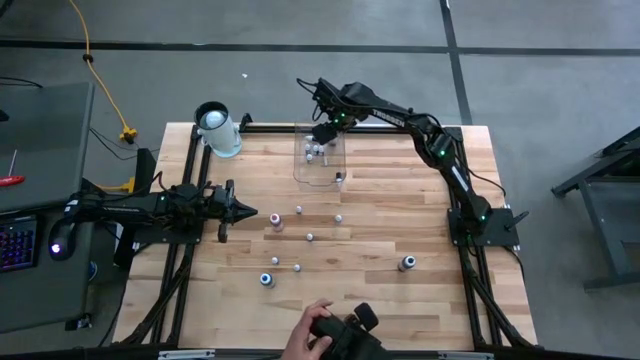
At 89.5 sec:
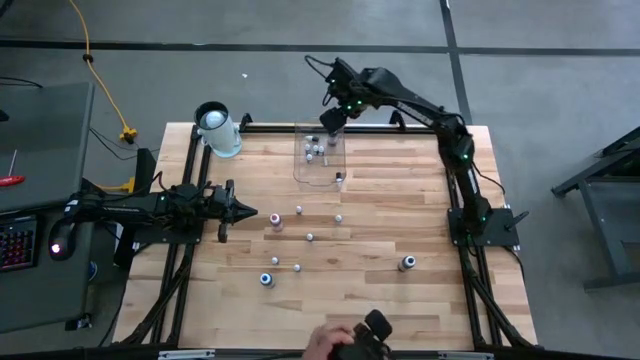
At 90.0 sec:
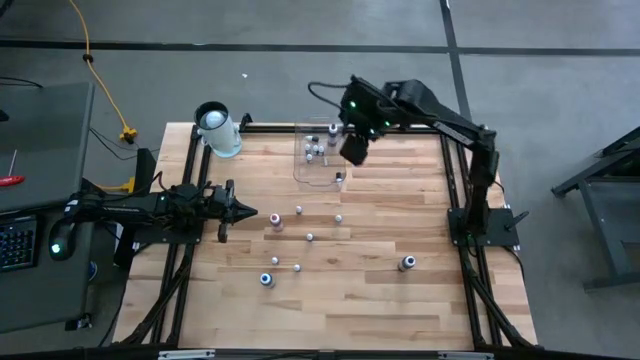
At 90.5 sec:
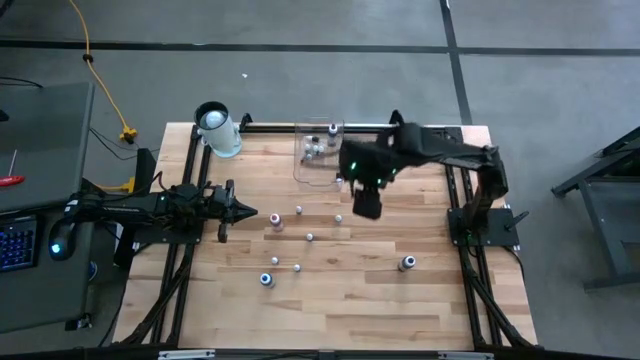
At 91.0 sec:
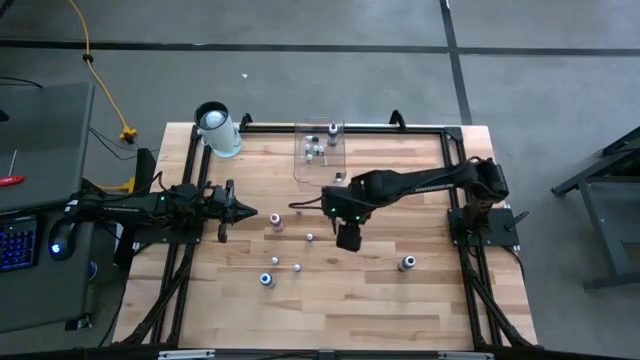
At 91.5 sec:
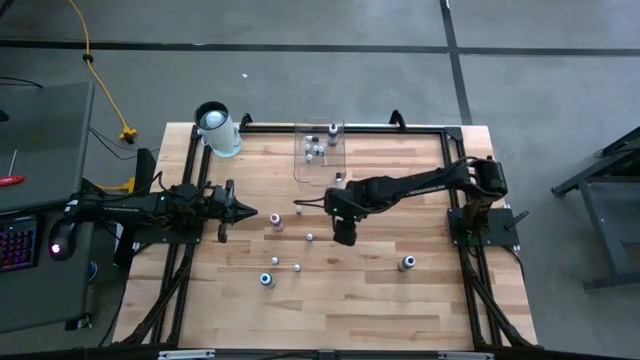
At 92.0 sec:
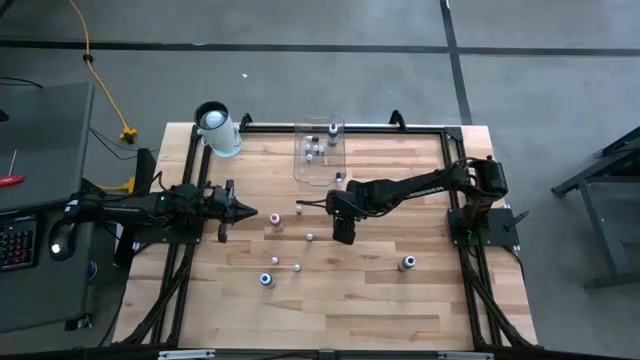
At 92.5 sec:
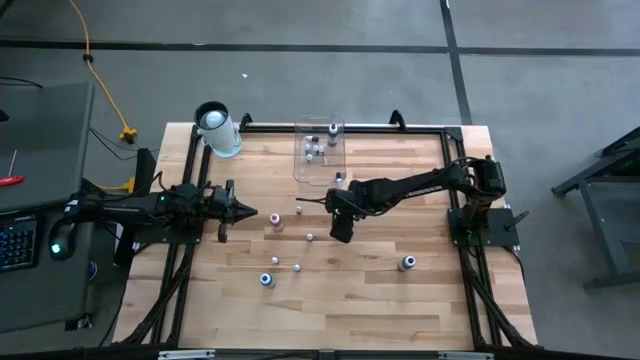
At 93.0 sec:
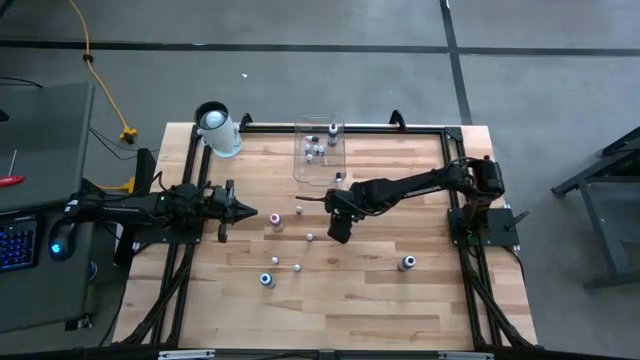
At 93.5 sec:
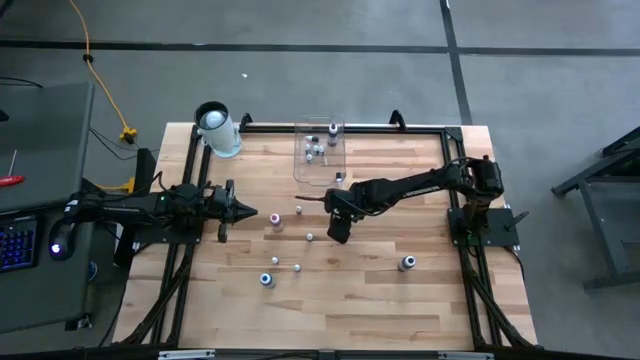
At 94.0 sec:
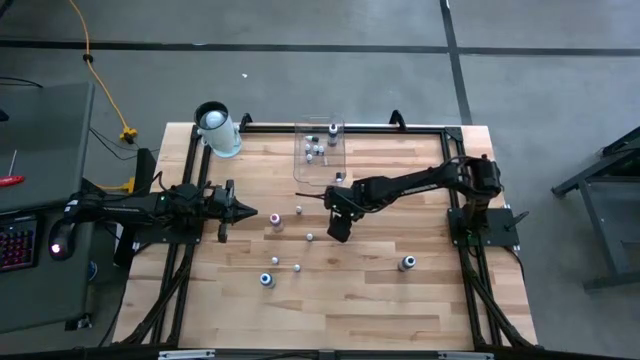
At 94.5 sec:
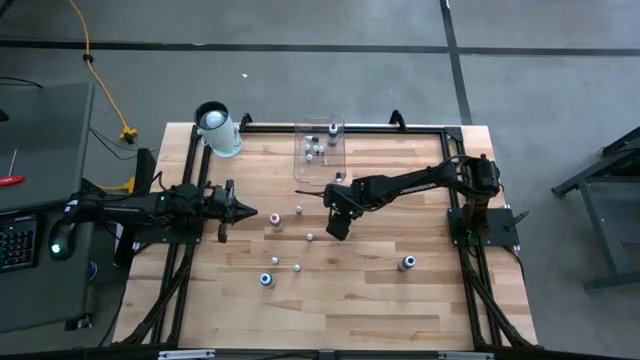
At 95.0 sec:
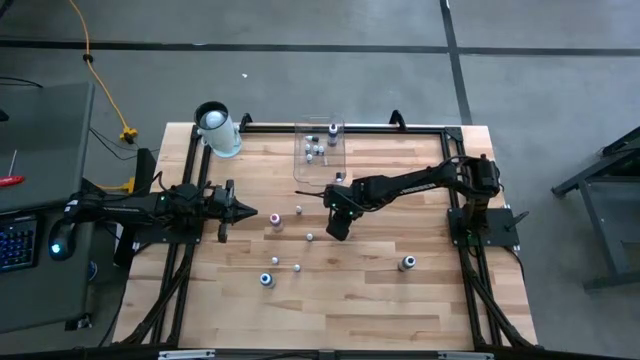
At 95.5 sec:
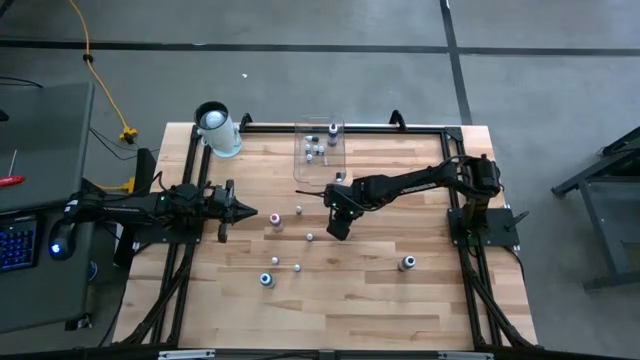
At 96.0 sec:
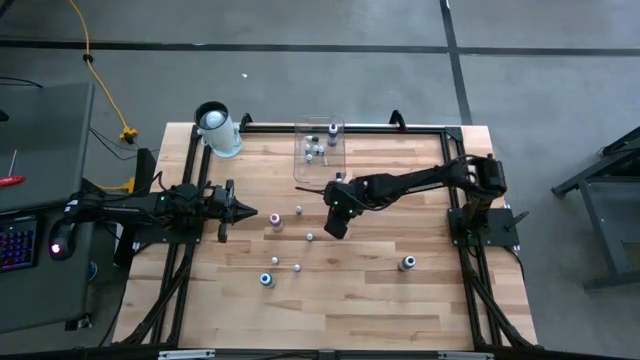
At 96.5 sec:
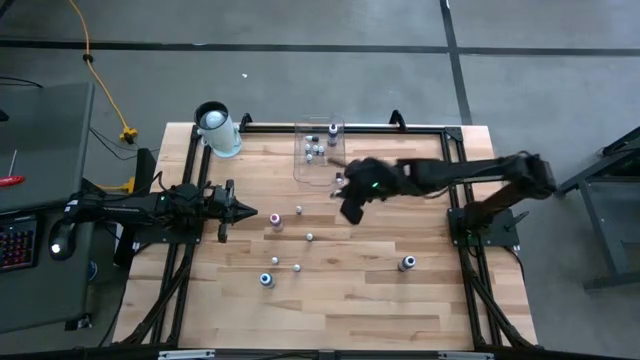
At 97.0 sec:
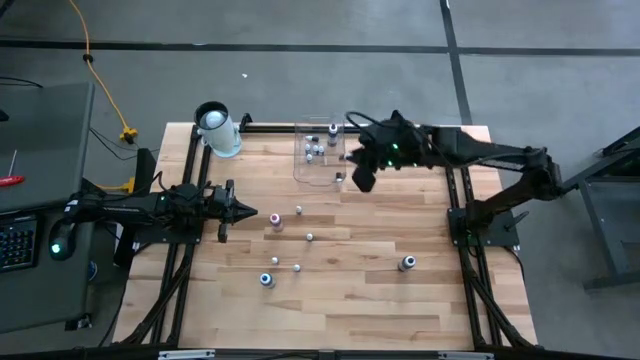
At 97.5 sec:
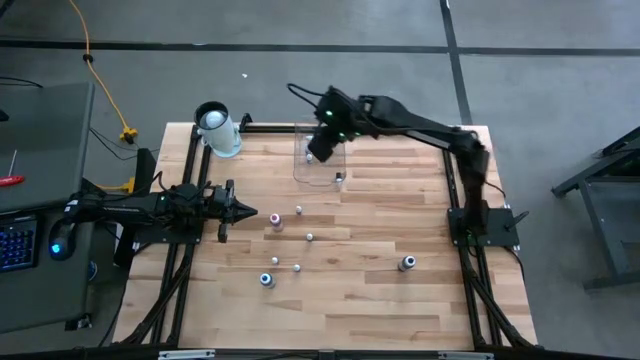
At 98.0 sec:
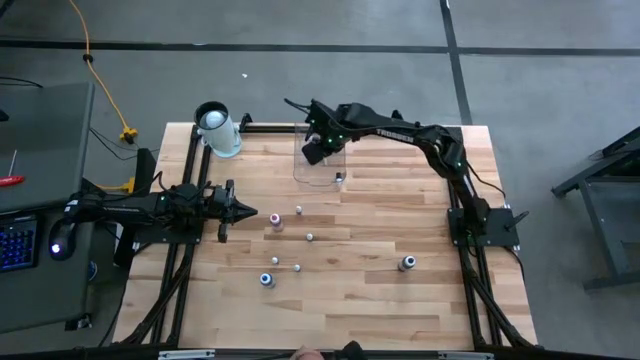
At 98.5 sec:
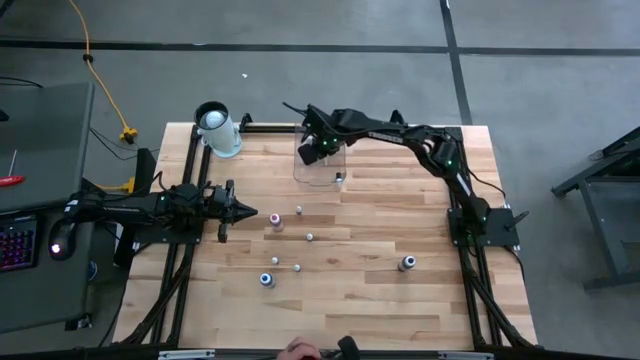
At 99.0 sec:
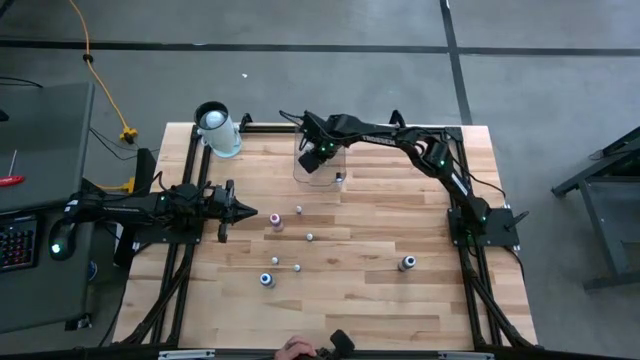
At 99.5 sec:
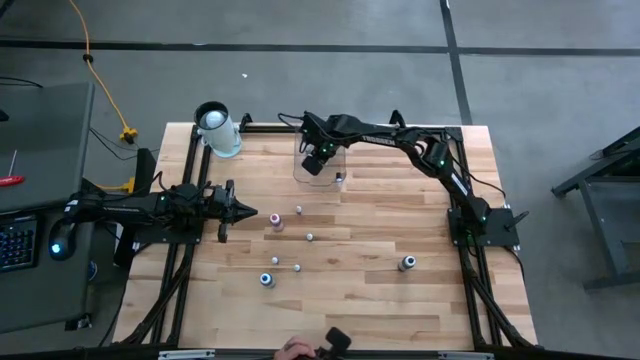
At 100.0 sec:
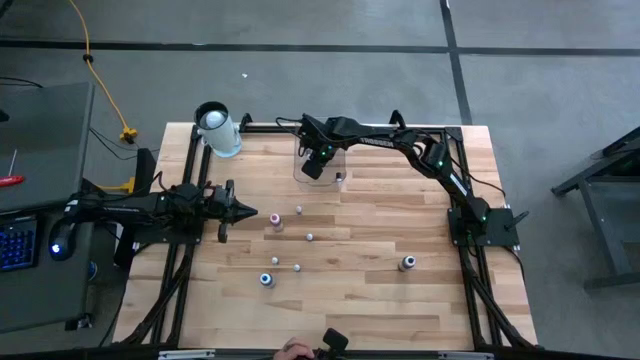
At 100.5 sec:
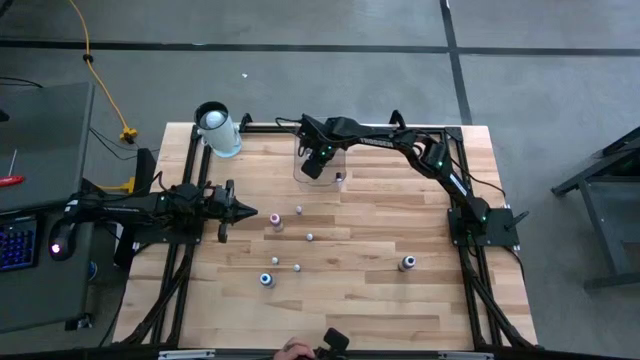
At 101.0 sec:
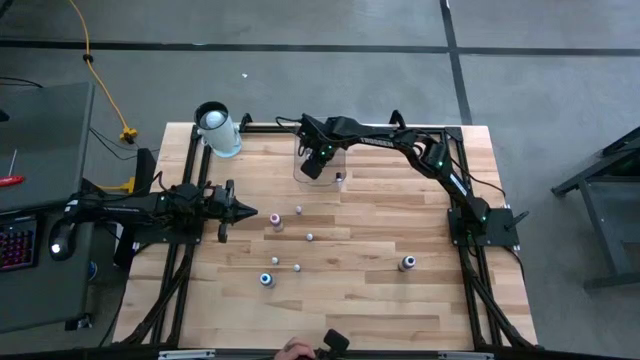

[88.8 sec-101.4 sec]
Task: Pick & Place food coloring
Put the small green food coloring bottle into the container

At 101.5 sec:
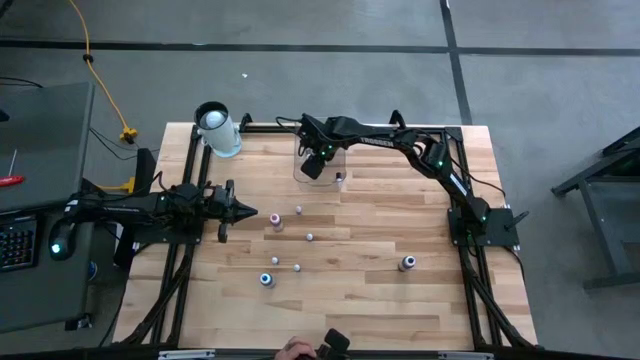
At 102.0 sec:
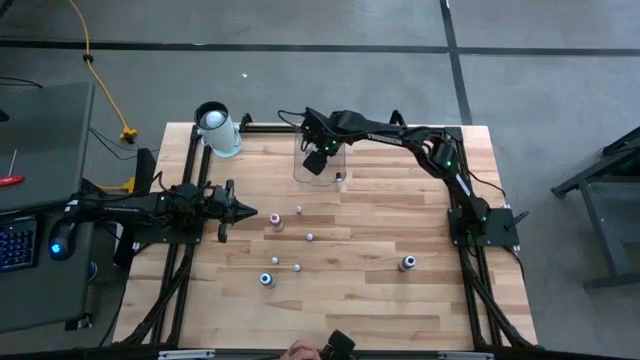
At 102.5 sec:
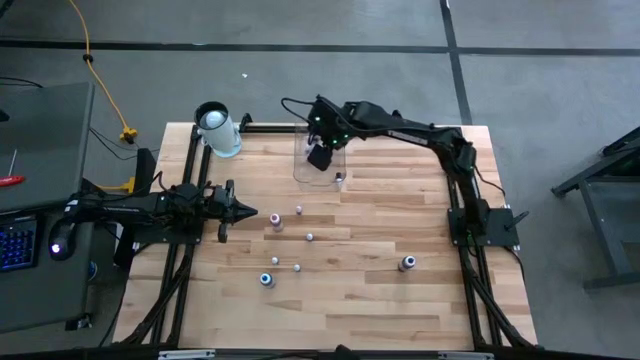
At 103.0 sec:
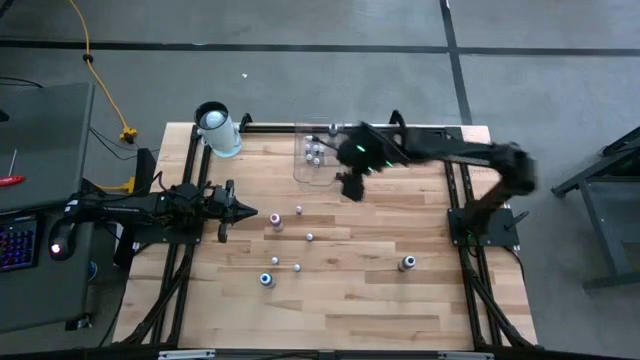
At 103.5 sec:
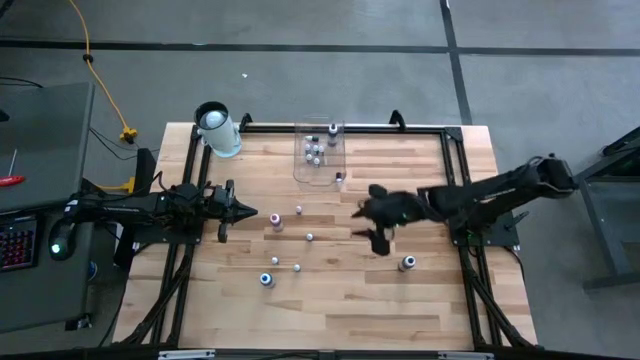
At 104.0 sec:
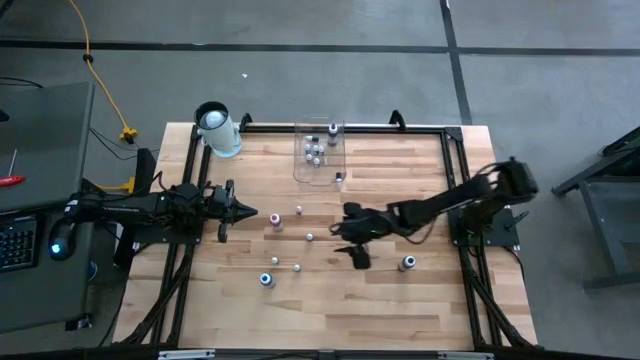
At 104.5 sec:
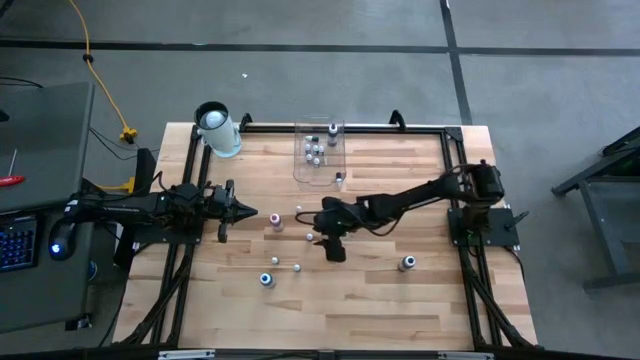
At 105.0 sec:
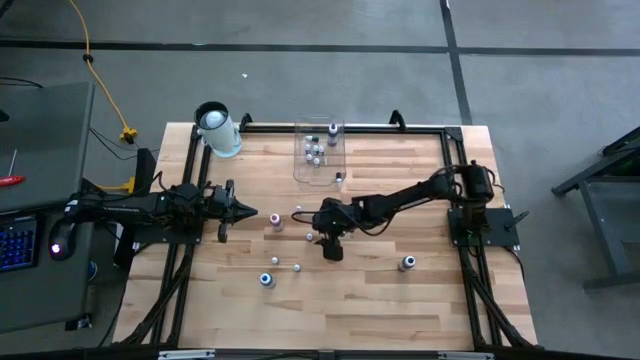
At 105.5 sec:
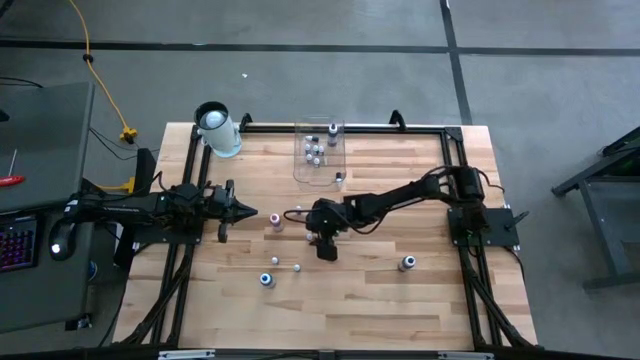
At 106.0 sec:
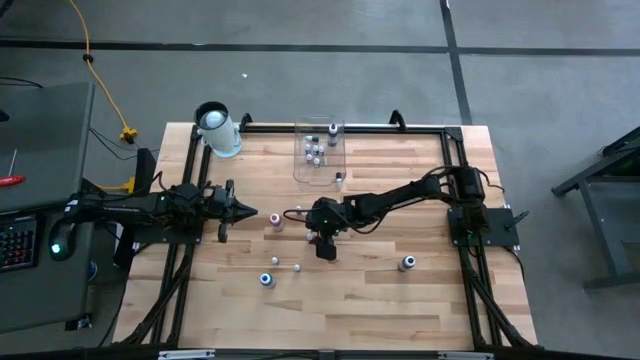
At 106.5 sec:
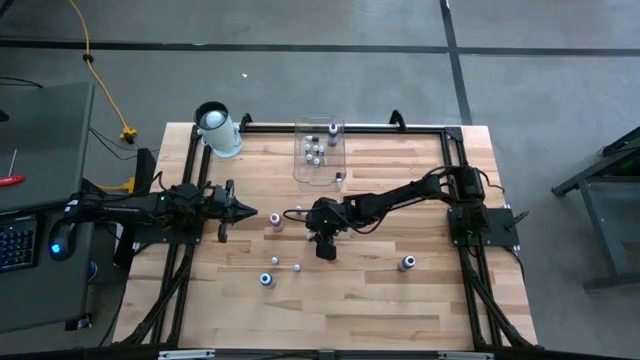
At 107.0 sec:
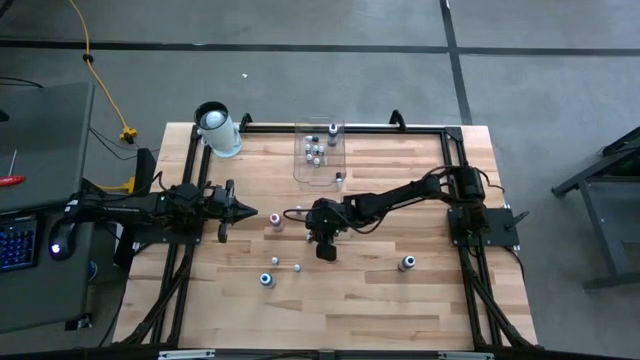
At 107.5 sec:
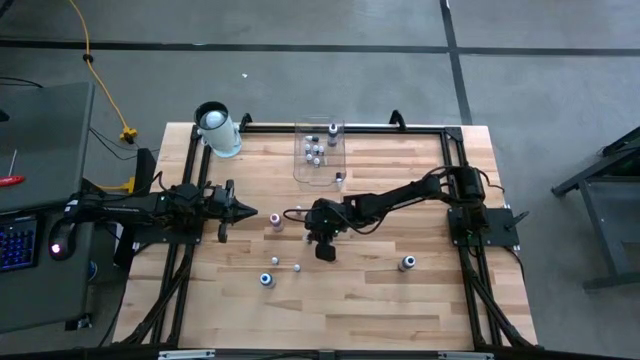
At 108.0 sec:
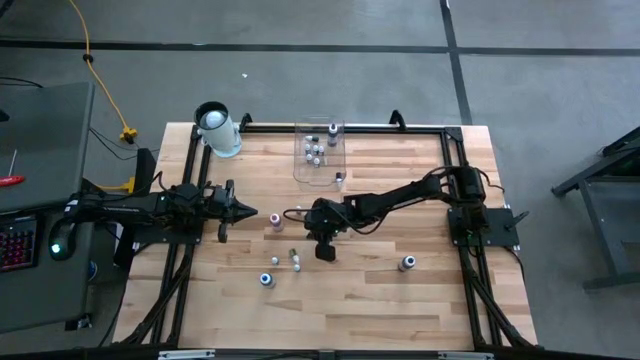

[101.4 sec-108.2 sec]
Put the small yellow food coloring bottle into the container
